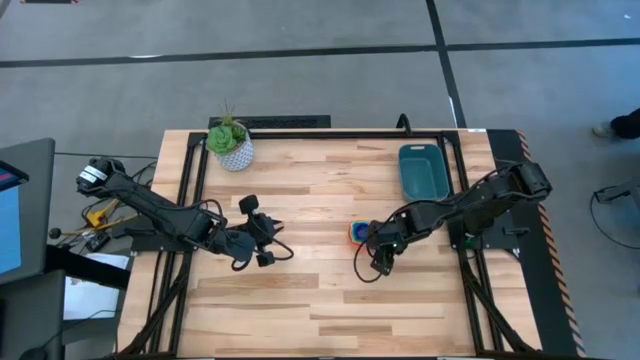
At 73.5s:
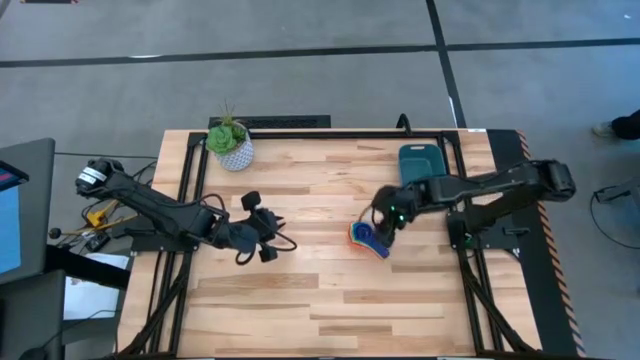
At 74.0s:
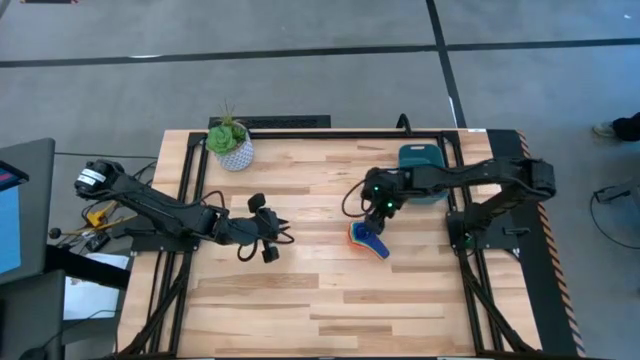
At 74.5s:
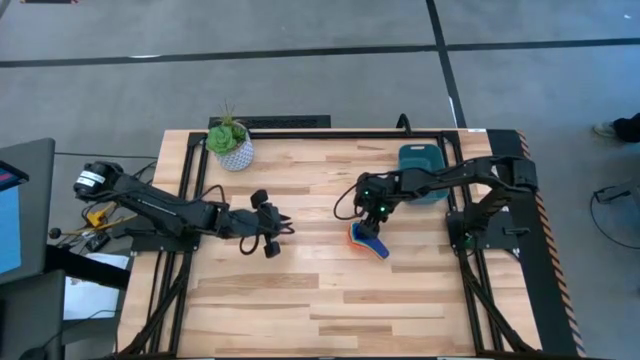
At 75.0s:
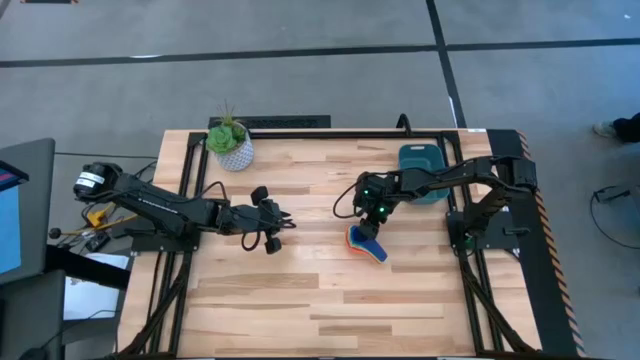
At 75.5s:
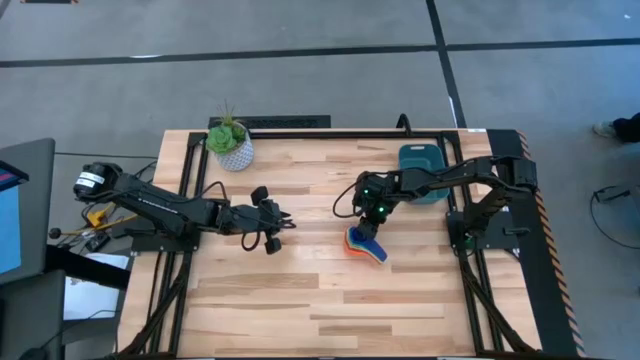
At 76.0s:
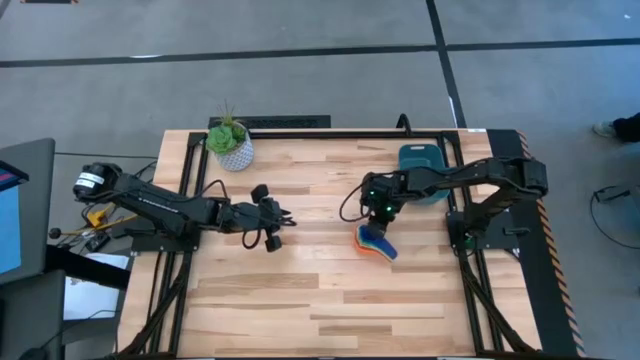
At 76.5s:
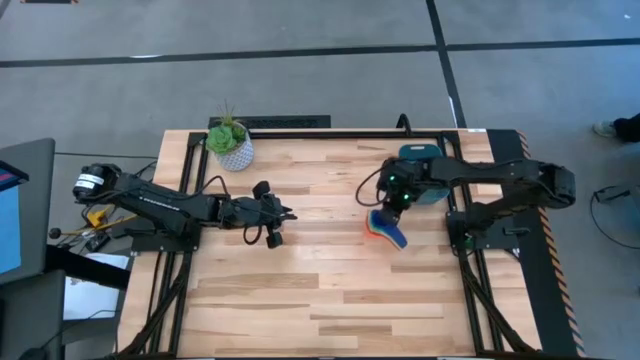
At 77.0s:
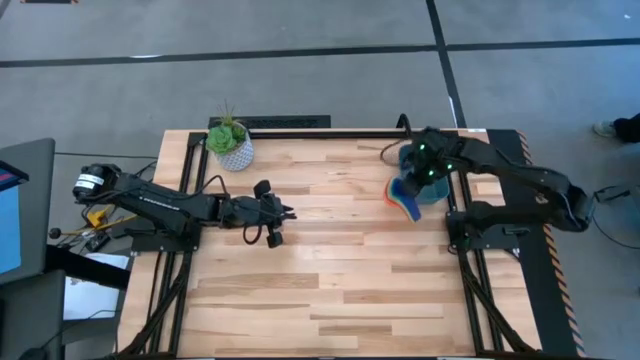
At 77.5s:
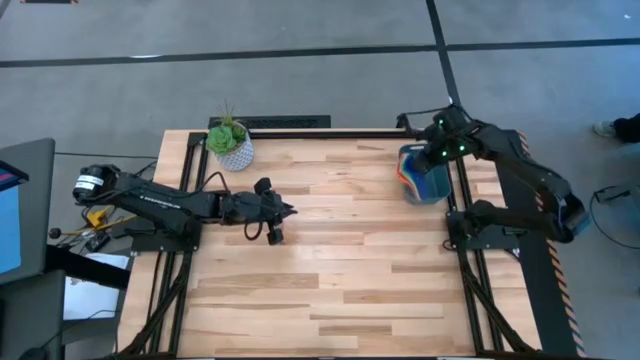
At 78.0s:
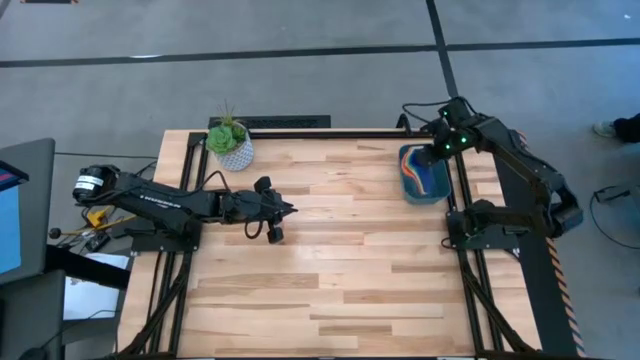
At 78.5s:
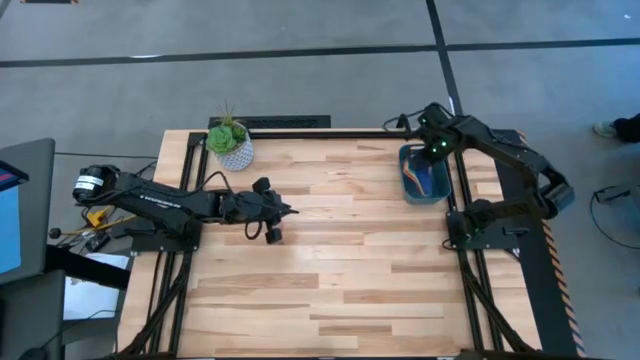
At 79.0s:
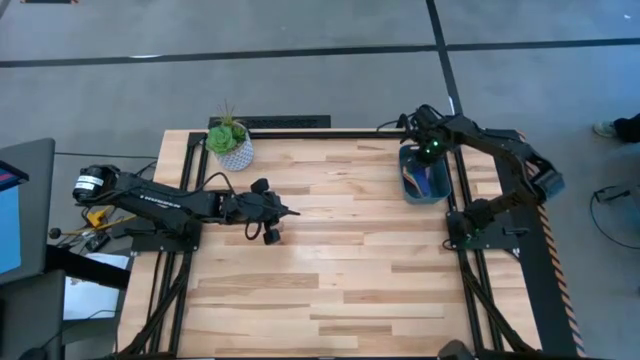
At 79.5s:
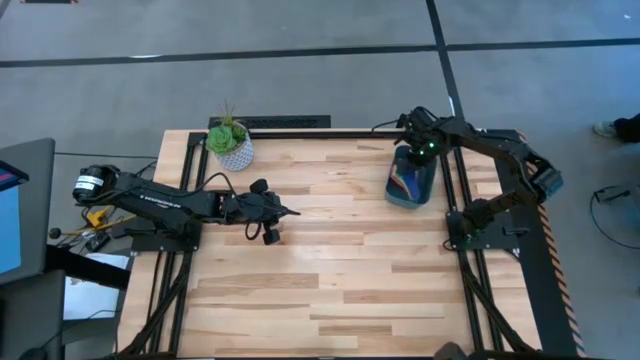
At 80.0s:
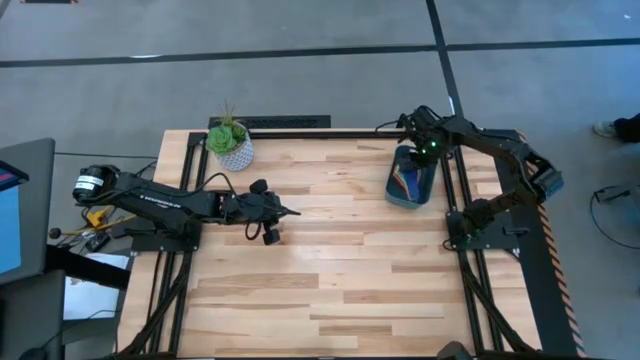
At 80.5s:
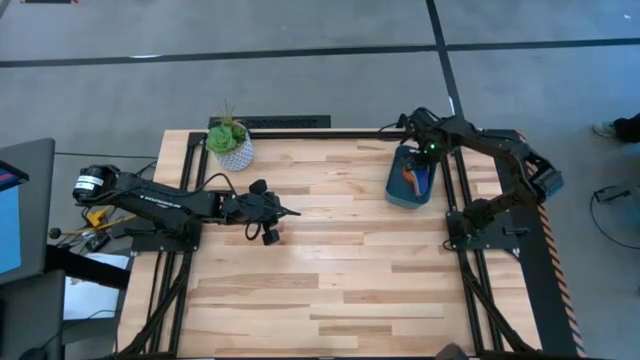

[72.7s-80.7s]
Task: Nest measuring cups in basket
Put the nested measuring cups into the blue bin

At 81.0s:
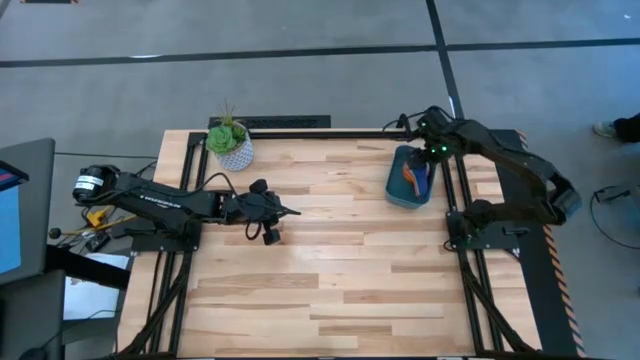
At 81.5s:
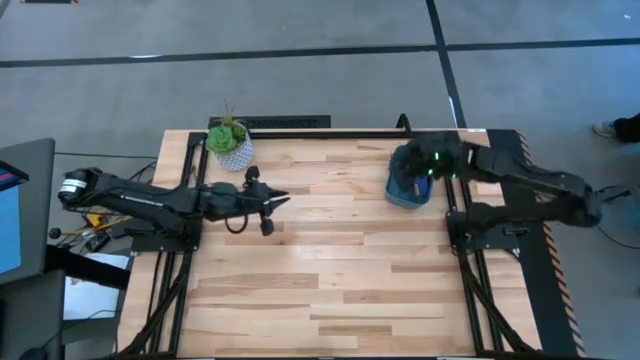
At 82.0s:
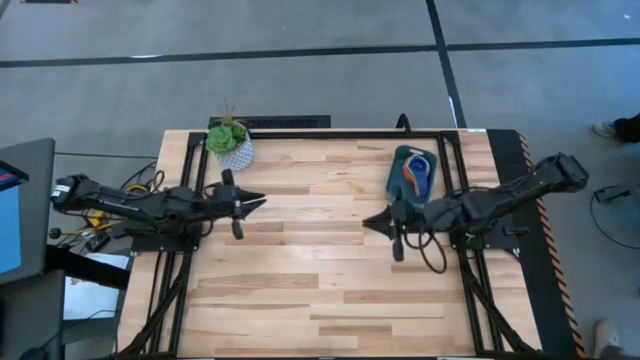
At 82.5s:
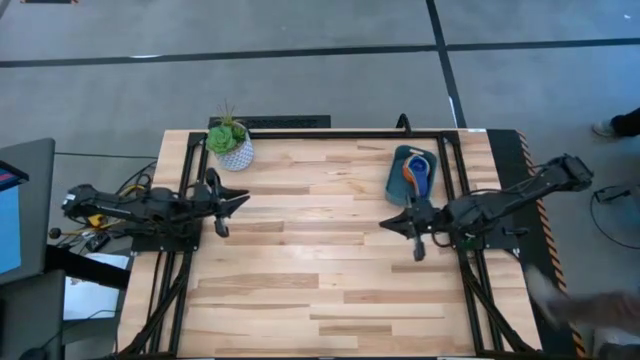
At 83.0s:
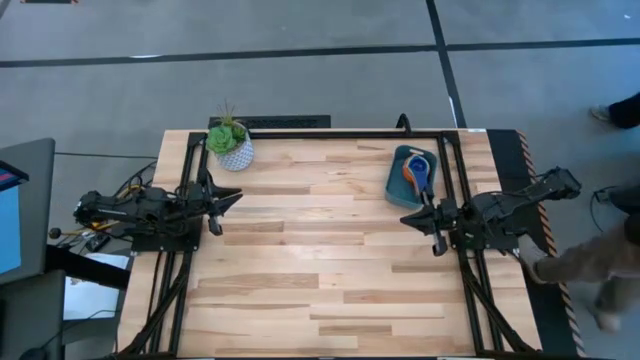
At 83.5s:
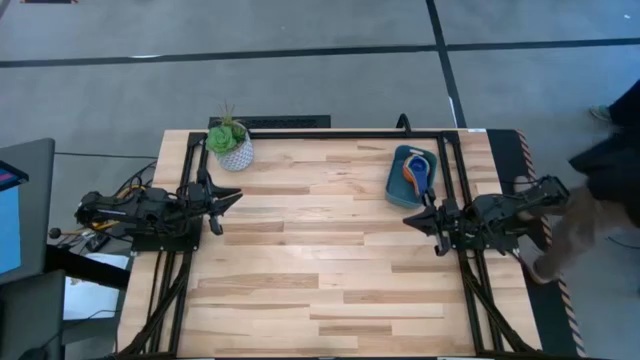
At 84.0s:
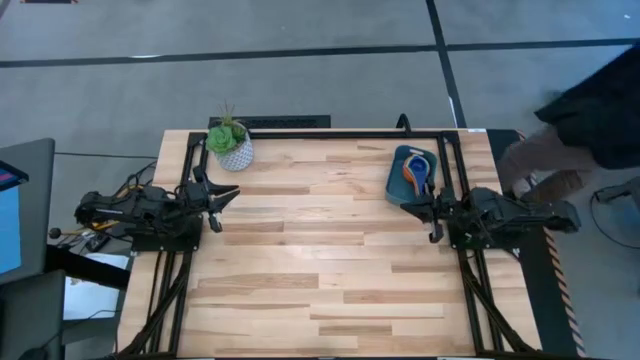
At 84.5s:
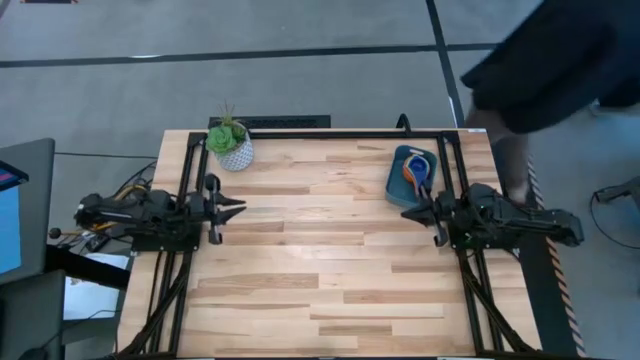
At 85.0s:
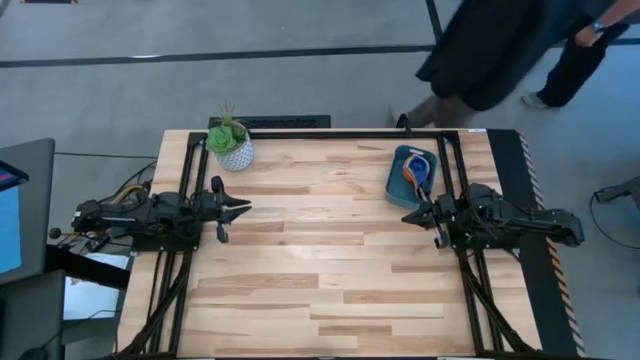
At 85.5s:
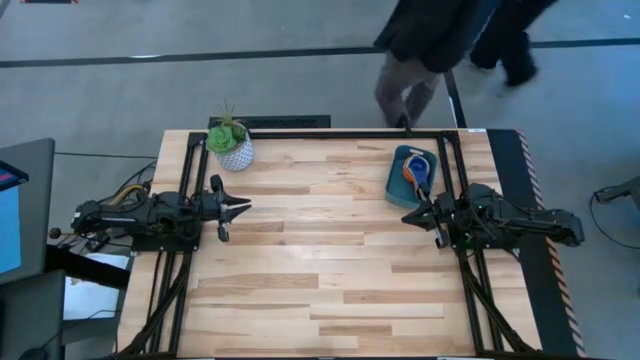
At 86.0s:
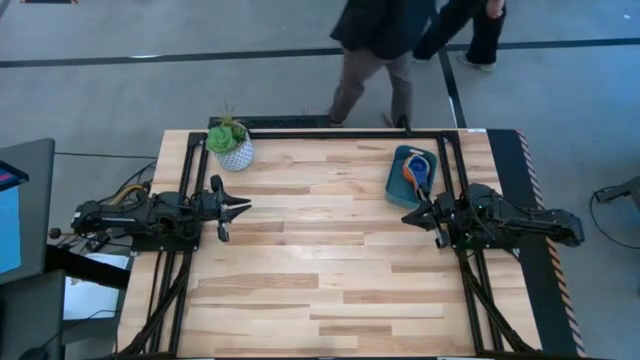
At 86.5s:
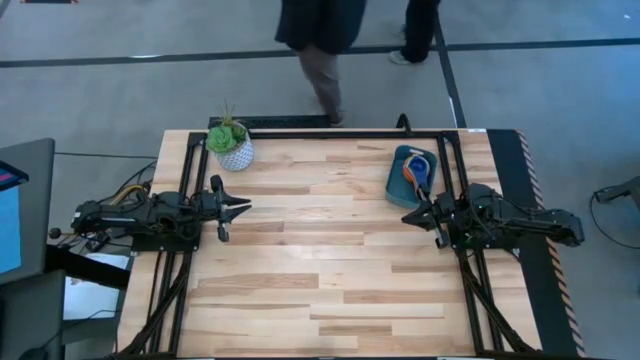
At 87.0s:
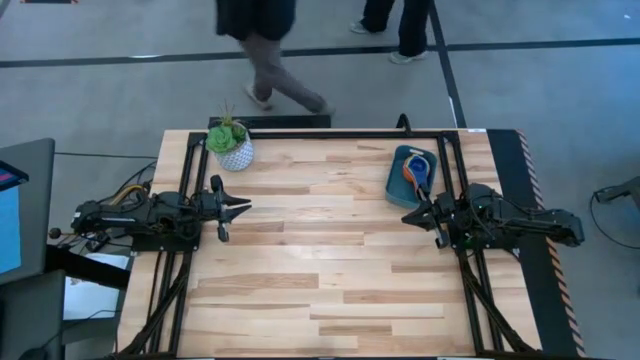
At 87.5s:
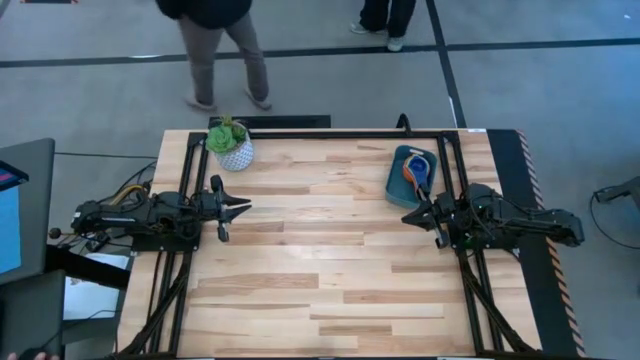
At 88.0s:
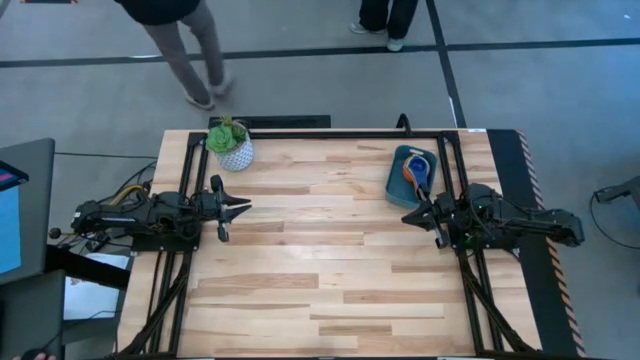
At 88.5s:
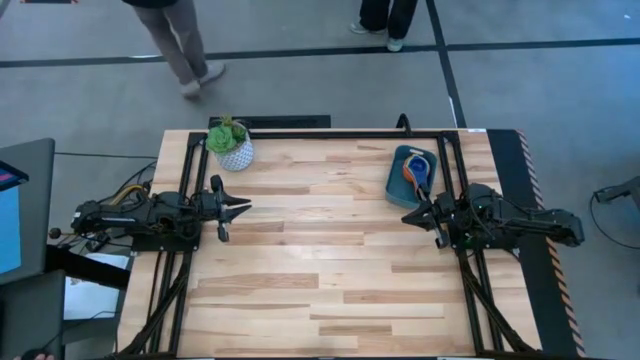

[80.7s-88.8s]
Return to Home Position

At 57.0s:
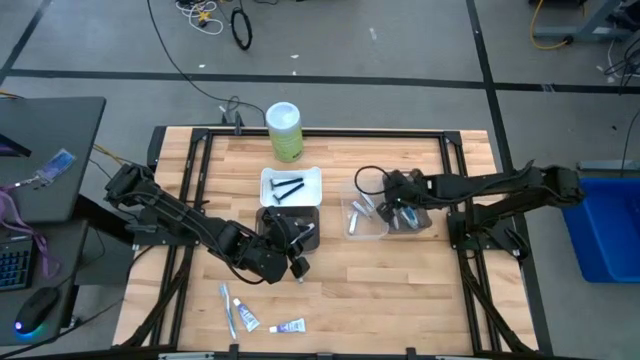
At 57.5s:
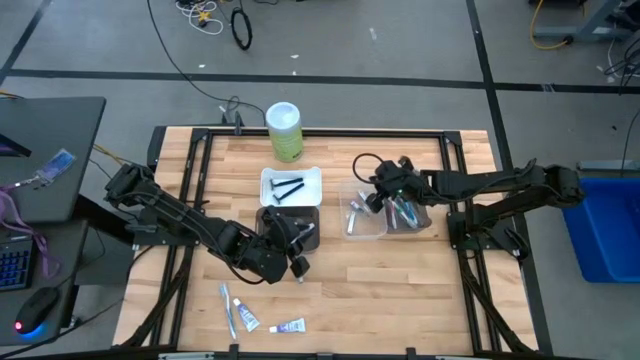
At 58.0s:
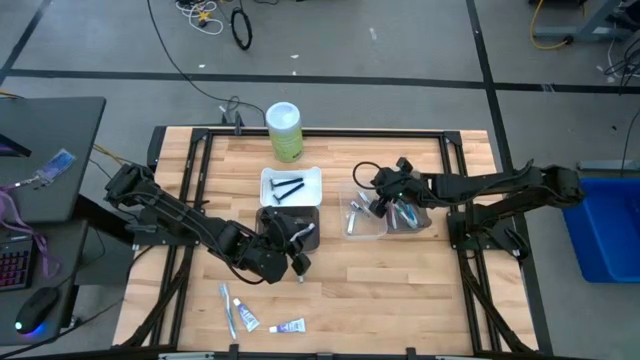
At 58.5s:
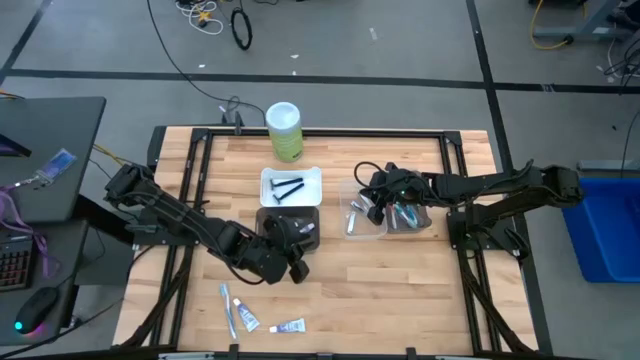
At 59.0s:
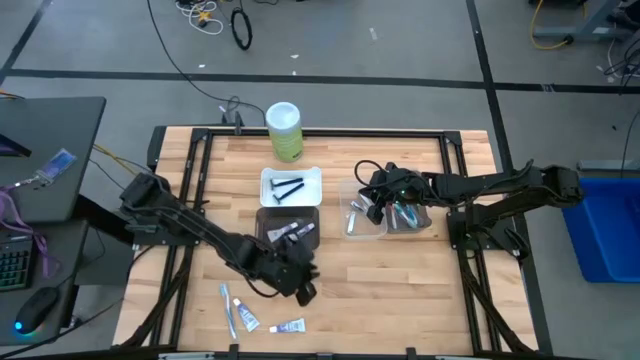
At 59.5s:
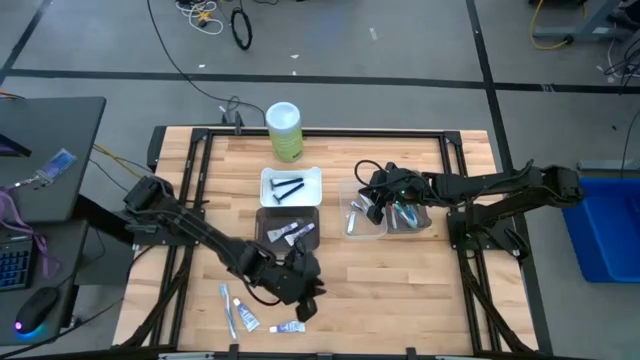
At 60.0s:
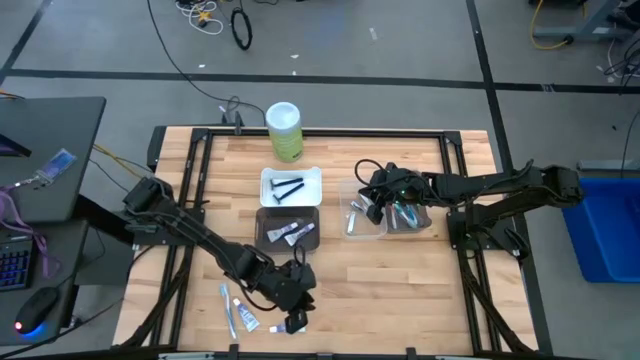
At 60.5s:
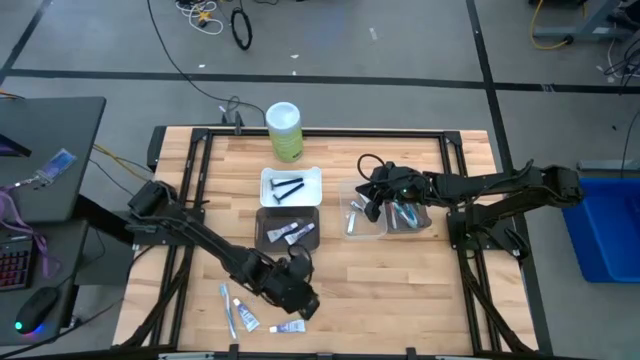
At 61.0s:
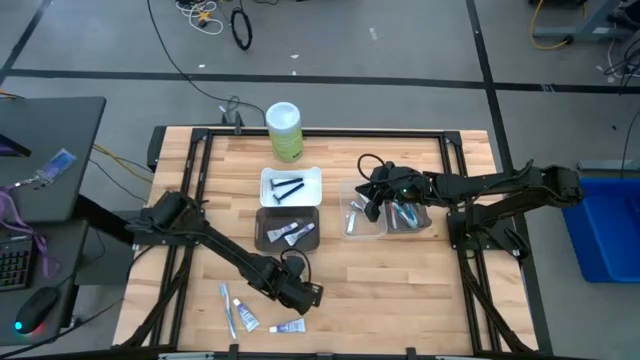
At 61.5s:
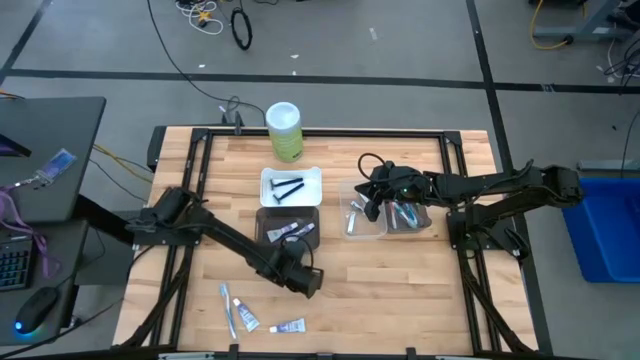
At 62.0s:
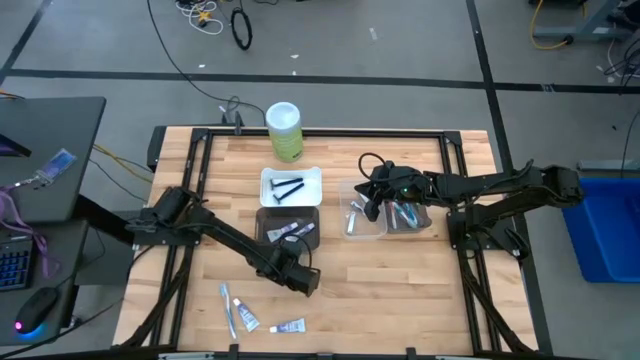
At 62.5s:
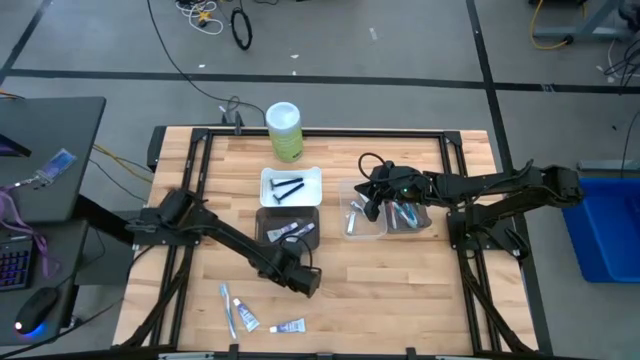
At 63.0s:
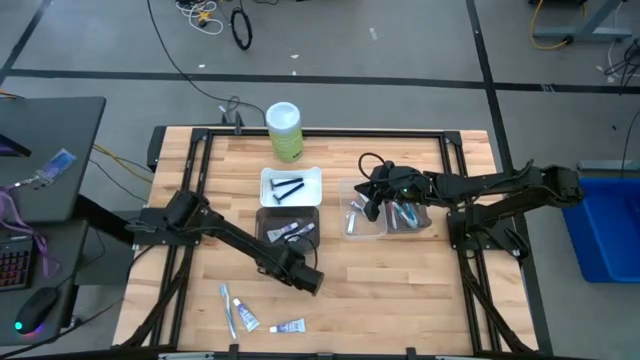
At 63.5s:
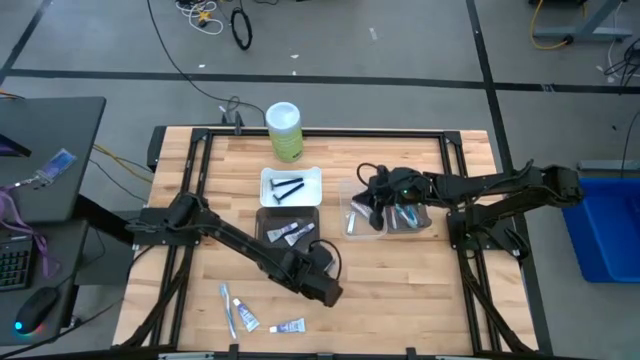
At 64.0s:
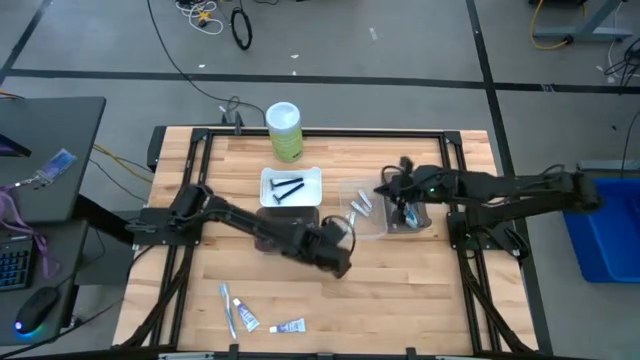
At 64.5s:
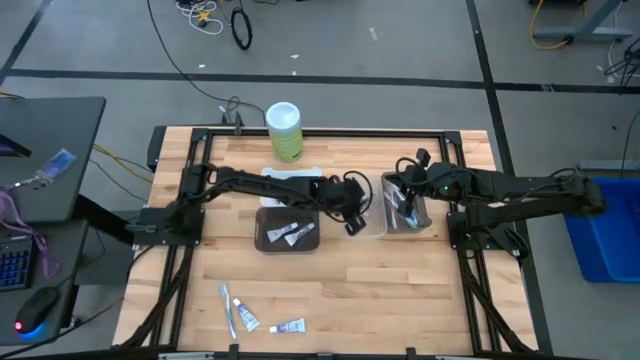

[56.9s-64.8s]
Task: Pick & Place Travel size toiletries
Put the silver nail cutter into the transparent bin
